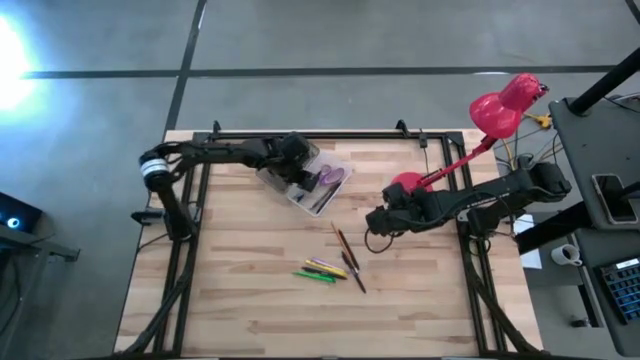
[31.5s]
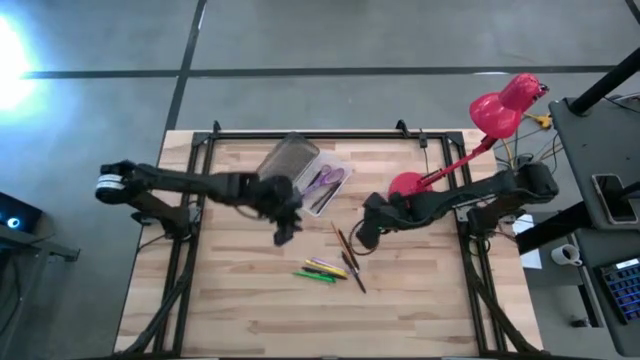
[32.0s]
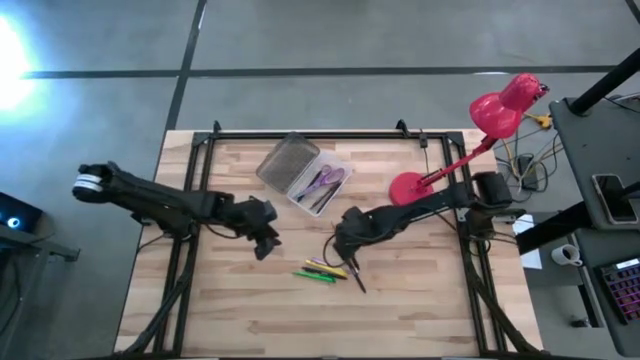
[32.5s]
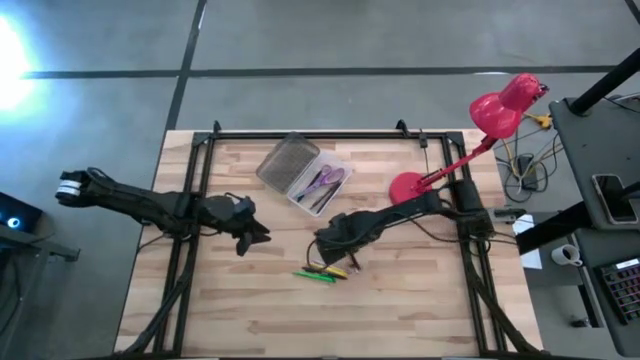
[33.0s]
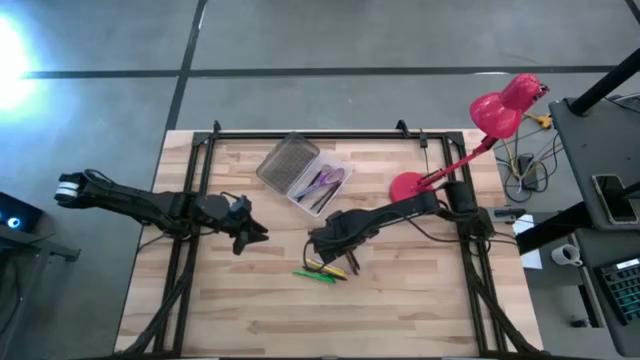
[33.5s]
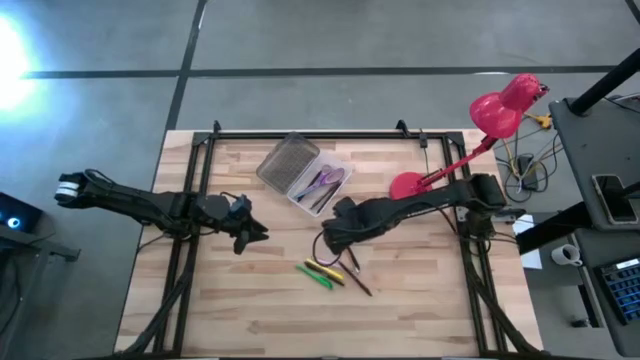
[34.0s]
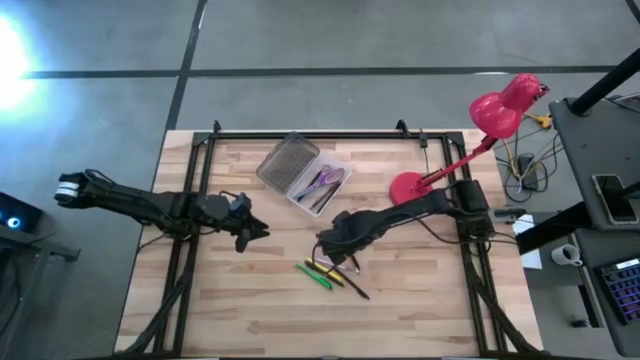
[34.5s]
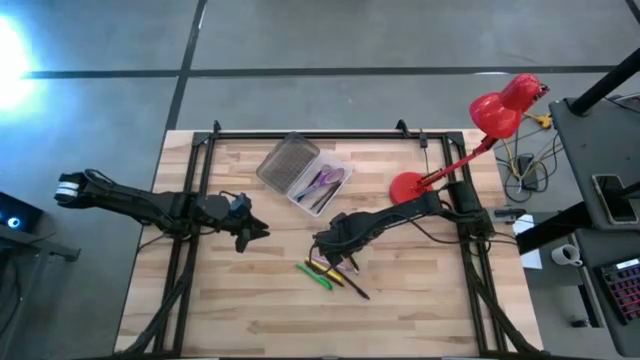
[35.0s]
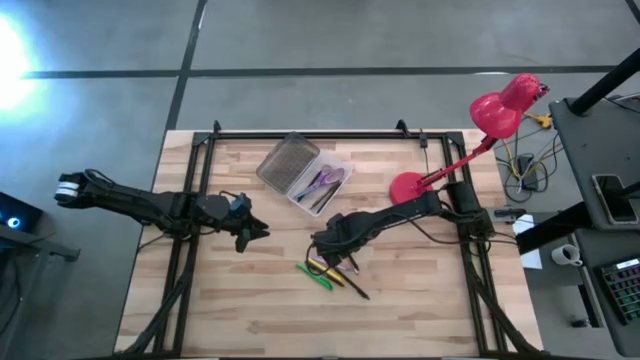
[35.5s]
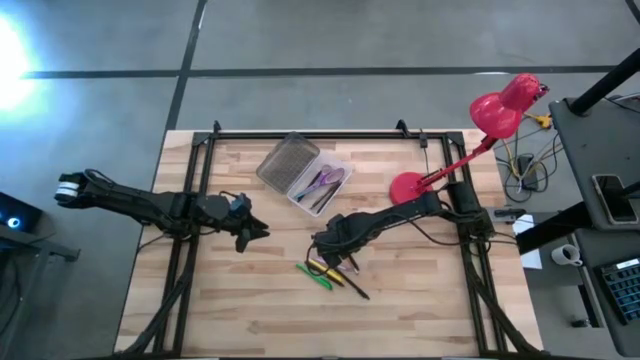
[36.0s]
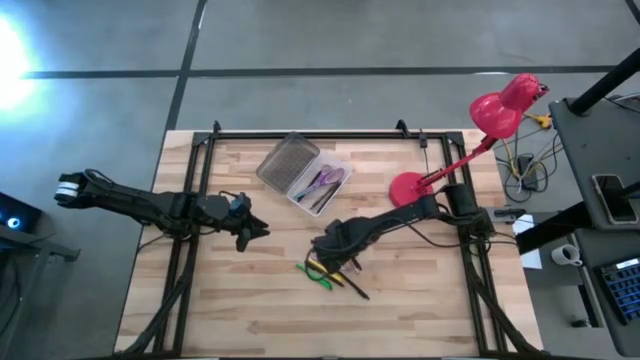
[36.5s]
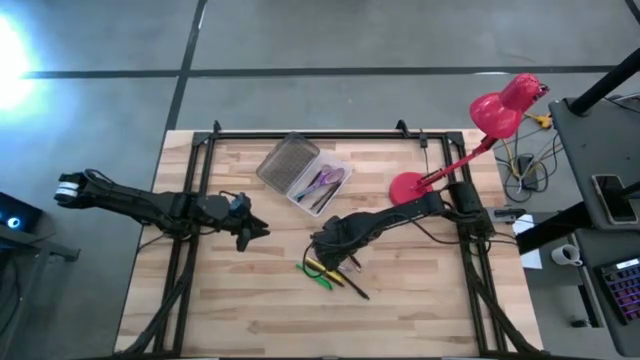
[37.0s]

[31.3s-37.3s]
Task: Pick & place school supplies into a supply box
Put the black pen into the black supply box

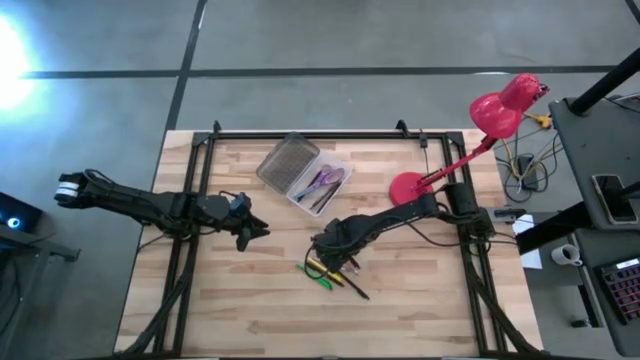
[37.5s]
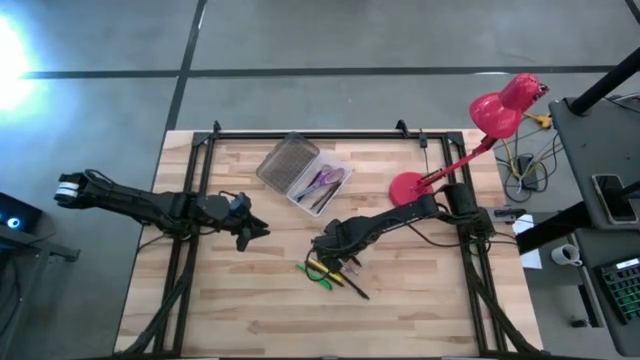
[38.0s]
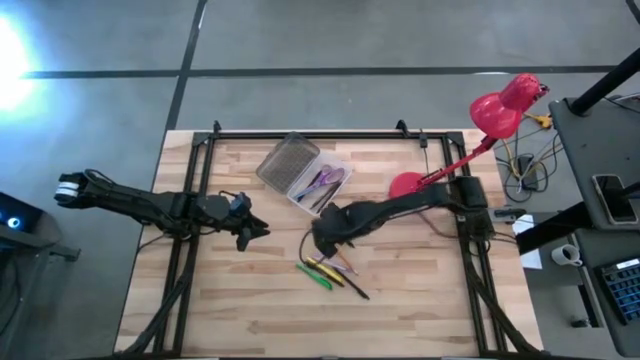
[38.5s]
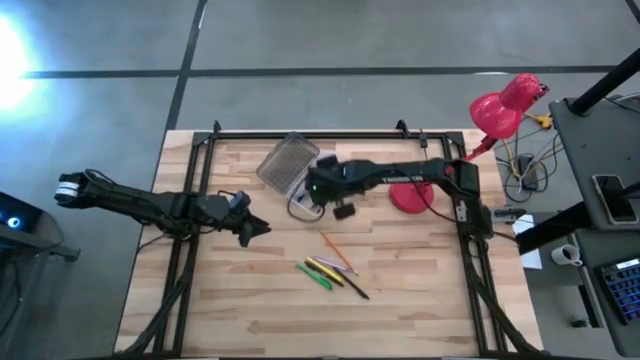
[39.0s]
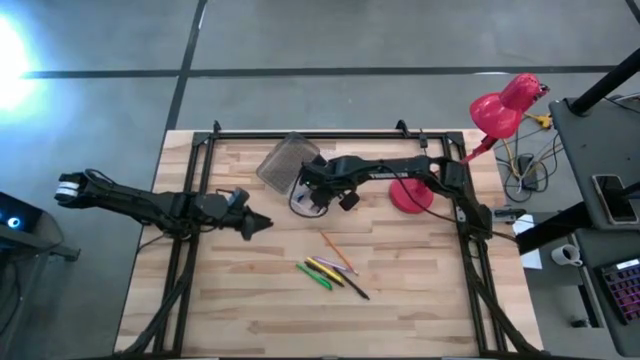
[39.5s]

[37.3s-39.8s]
Put the black pen into the black supply box

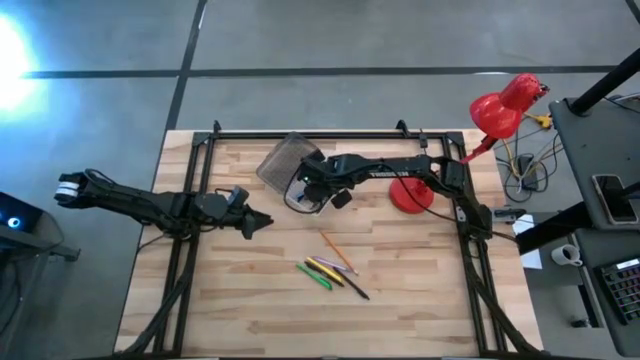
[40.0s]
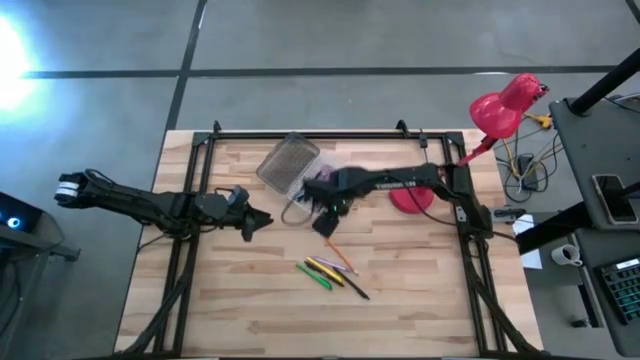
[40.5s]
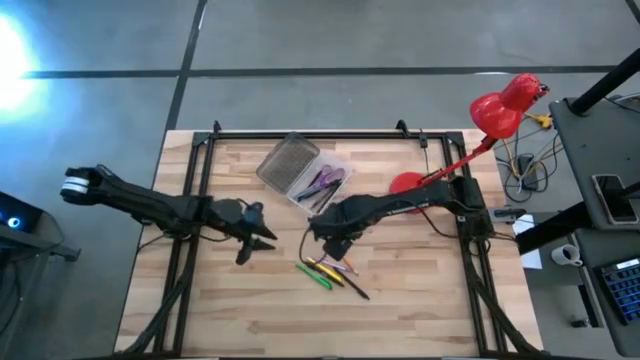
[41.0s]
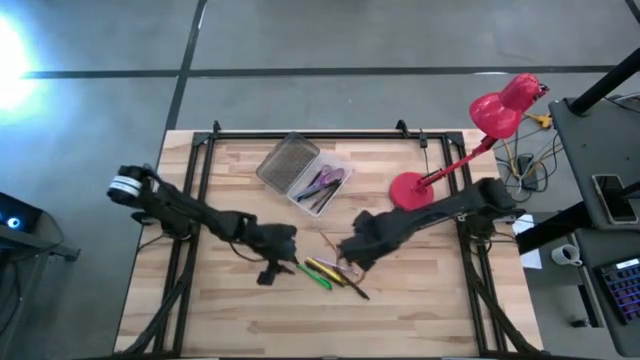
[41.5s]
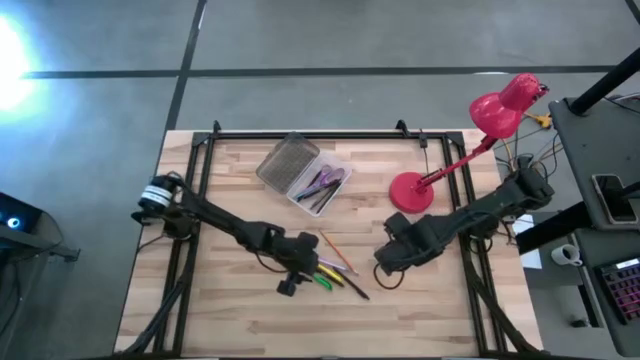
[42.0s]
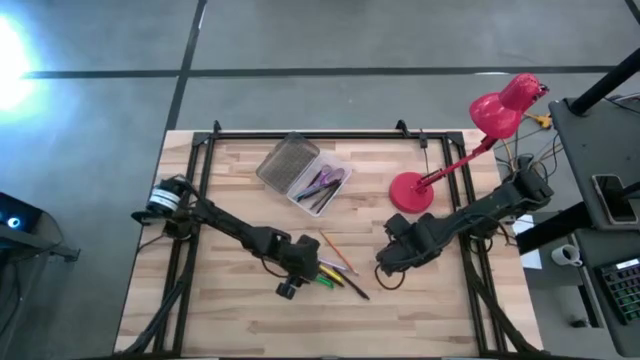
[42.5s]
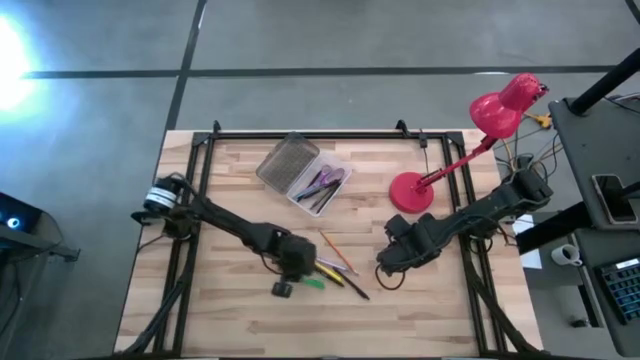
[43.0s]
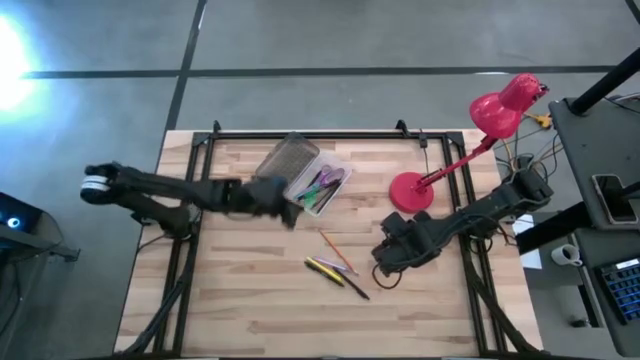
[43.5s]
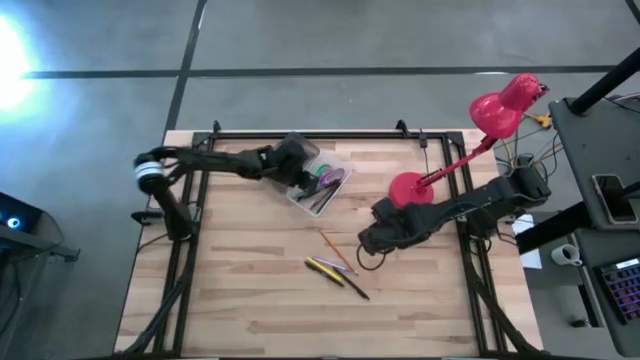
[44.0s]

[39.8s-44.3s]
Put the green pen into the black supply box

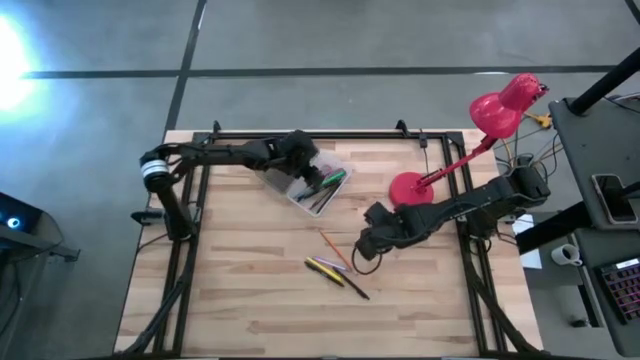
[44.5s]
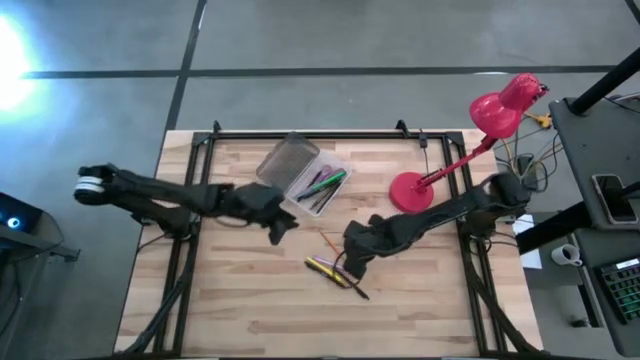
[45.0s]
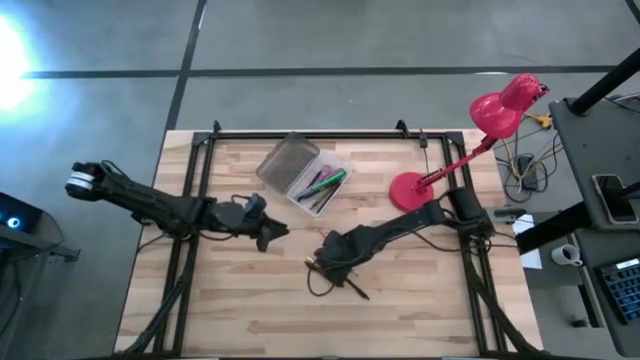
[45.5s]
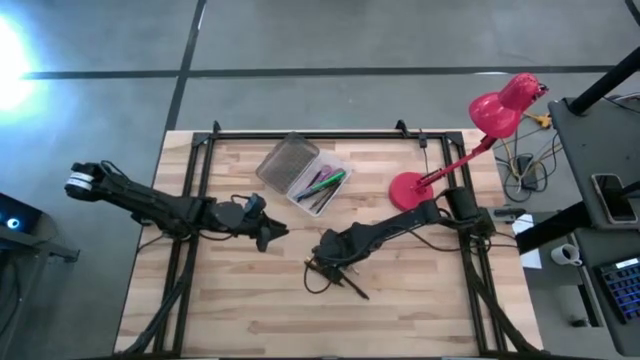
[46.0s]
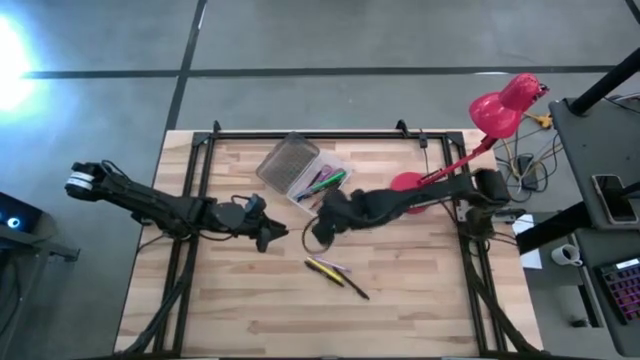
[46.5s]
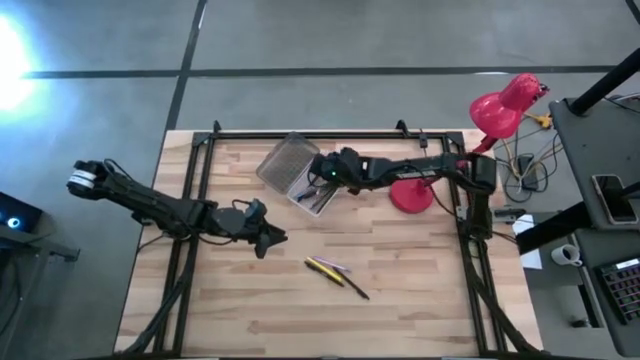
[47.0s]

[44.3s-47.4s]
Put the orange pencil into the black supply box

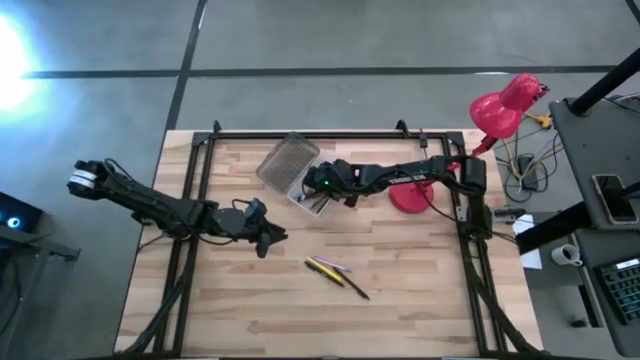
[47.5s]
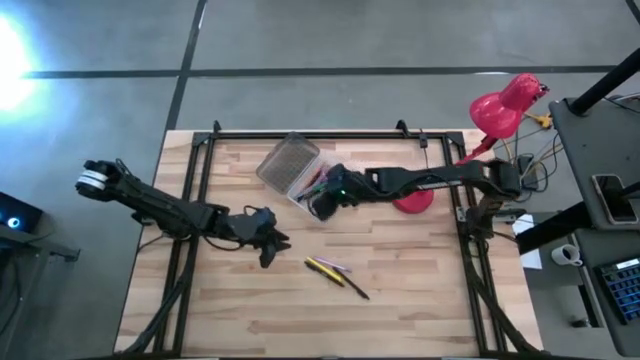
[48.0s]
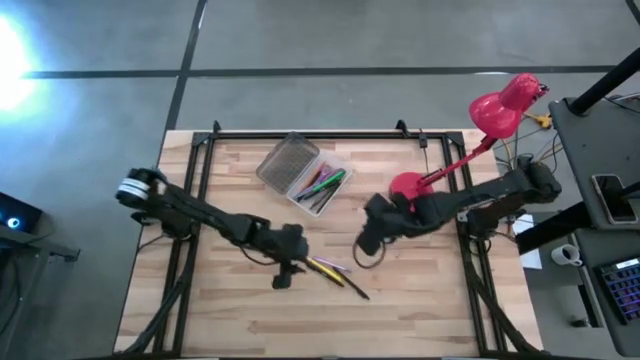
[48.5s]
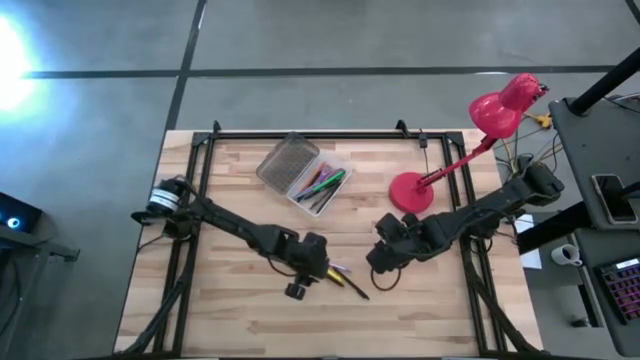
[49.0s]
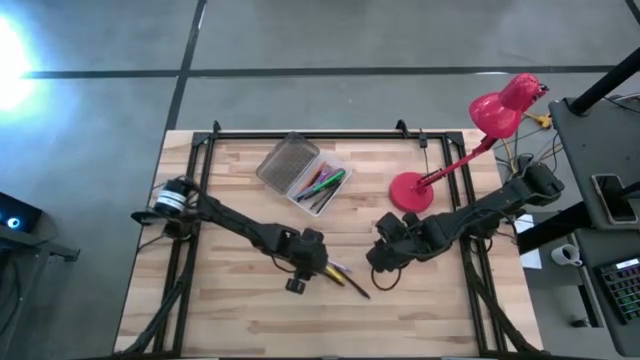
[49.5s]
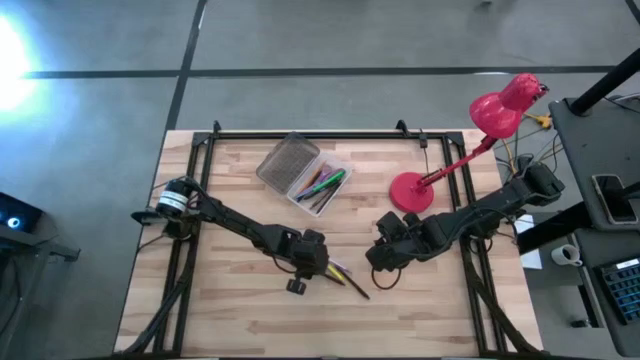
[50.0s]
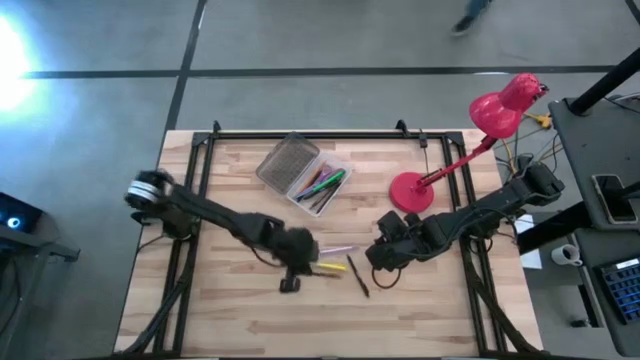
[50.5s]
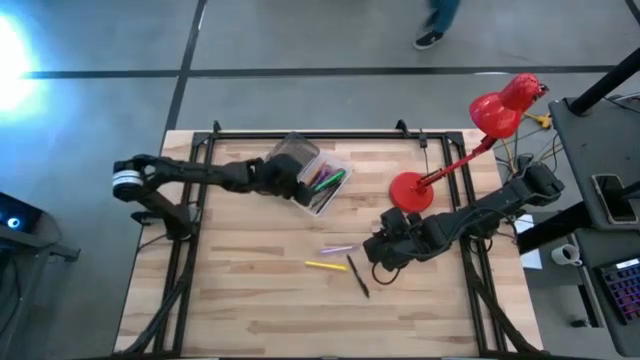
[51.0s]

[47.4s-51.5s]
Put the black pen into the black supply box

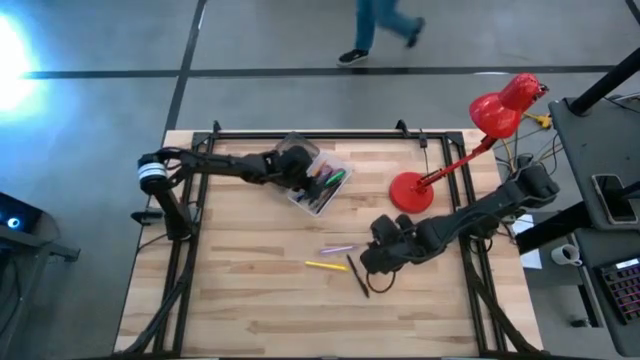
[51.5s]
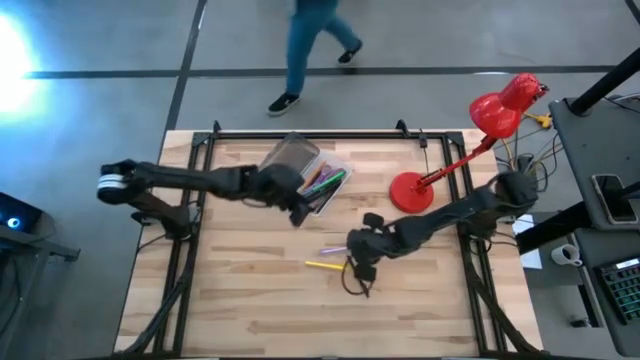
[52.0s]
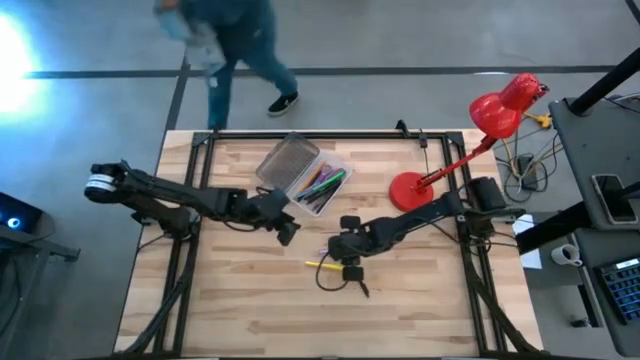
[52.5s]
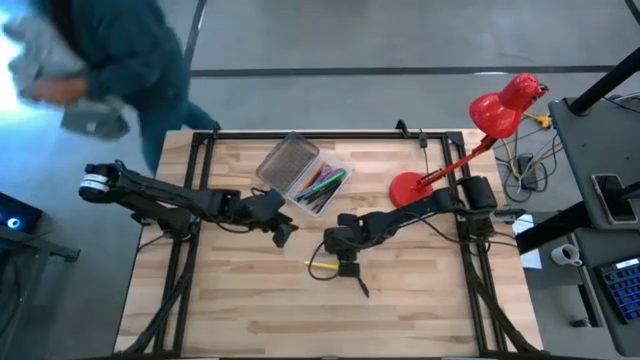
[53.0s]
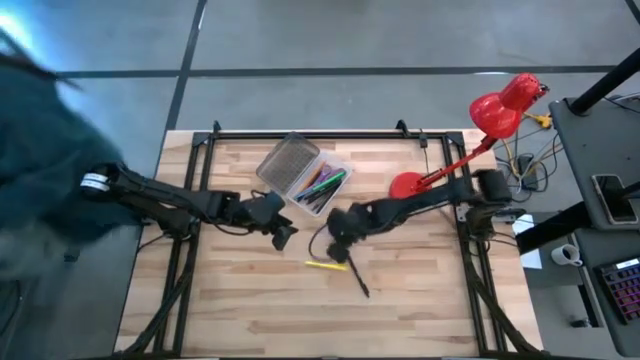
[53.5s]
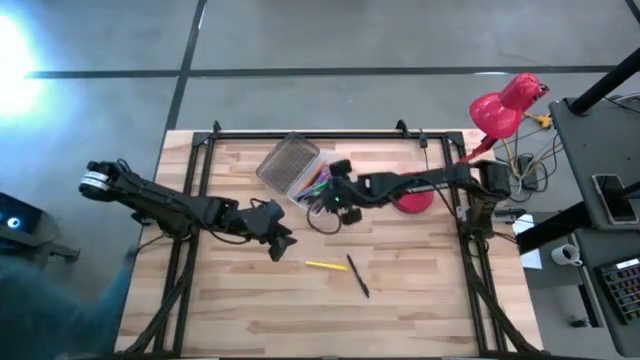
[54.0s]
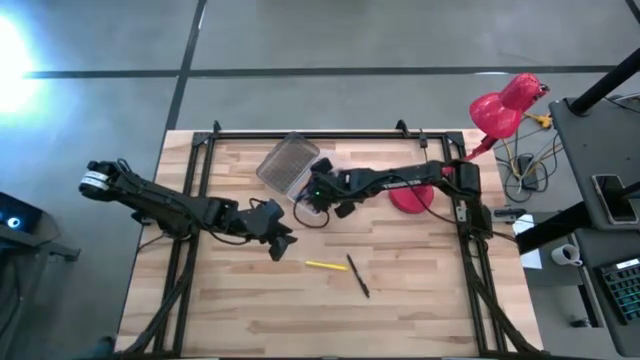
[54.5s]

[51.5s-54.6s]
Put the violet pen into the black supply box
